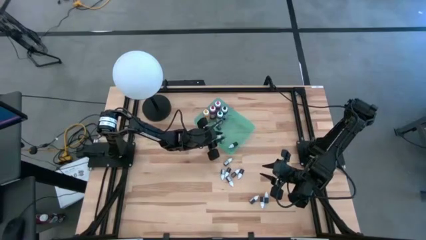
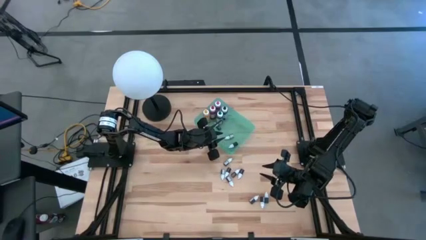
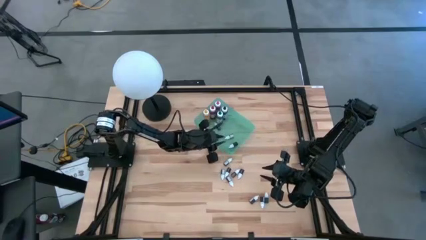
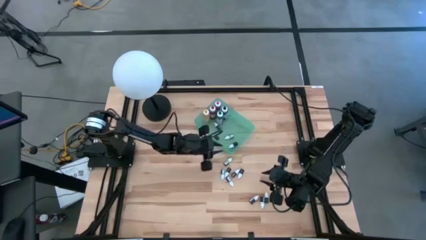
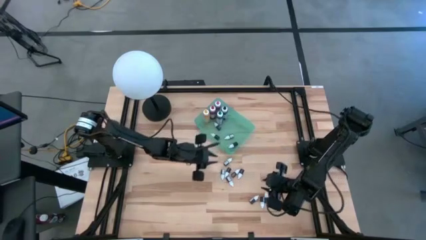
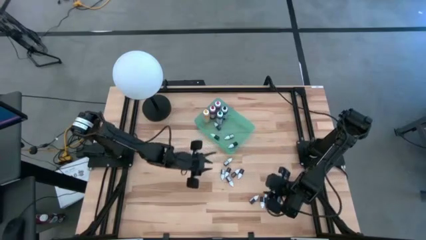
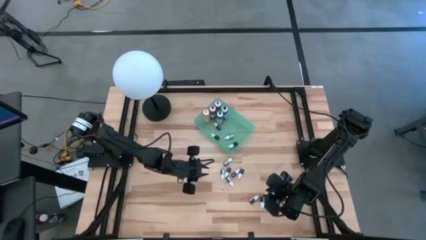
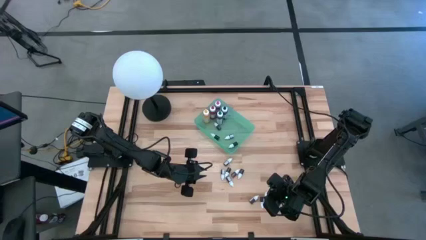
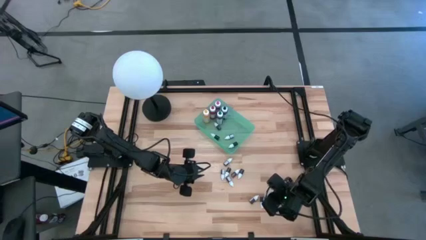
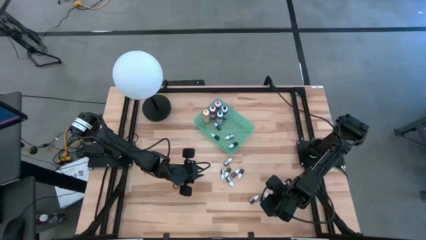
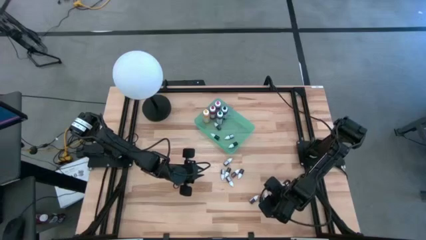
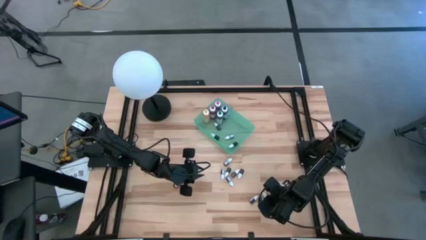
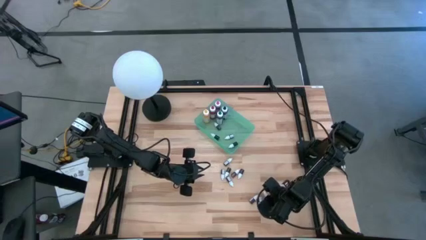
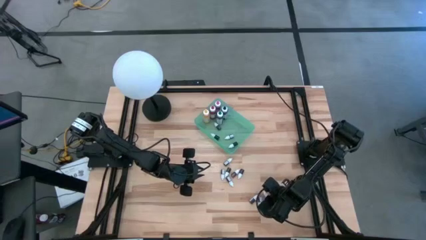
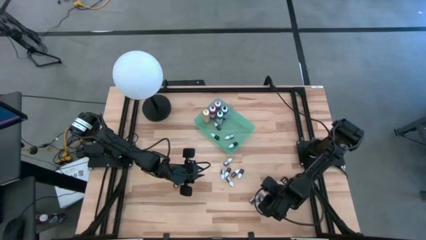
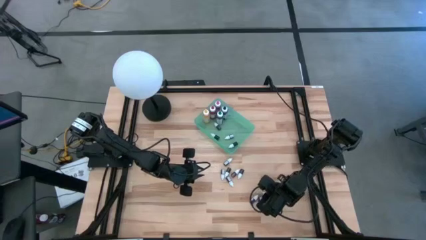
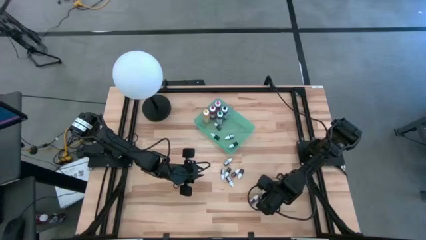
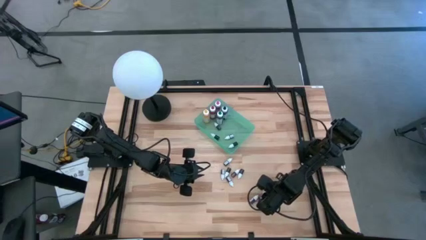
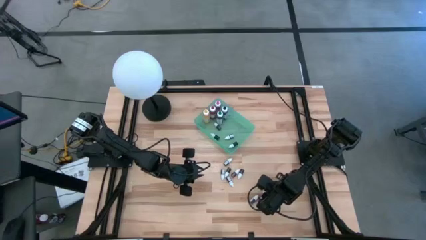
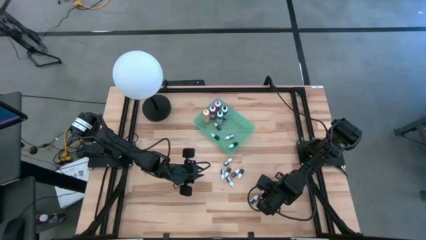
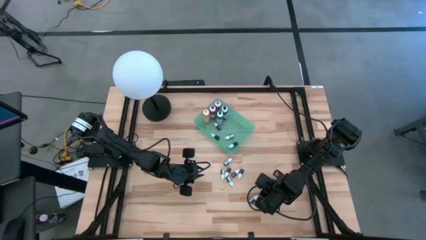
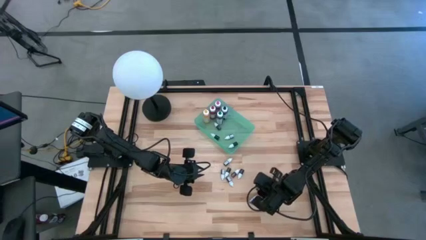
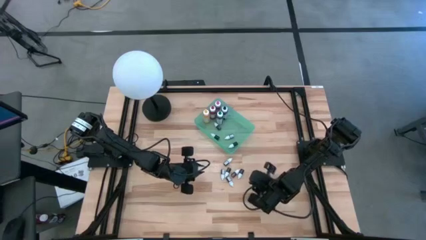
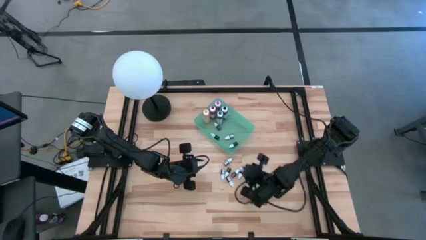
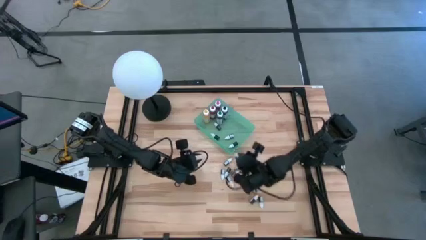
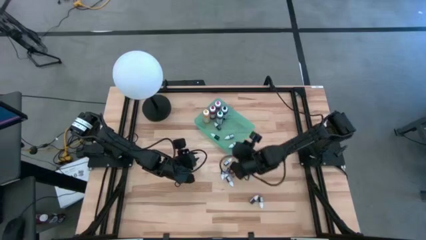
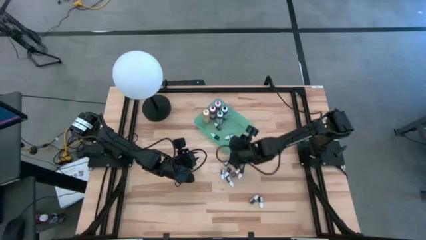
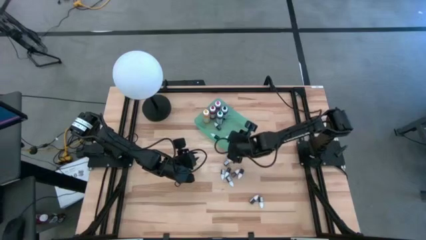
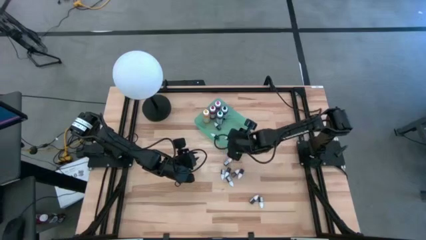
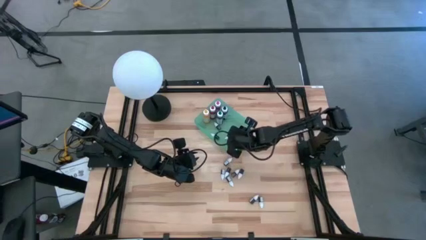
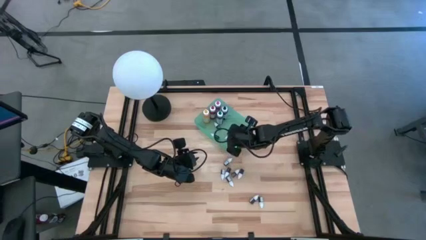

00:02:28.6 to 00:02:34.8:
Task: Pick & Place food coloring
Put the small blue food coloring bottle into the green bin

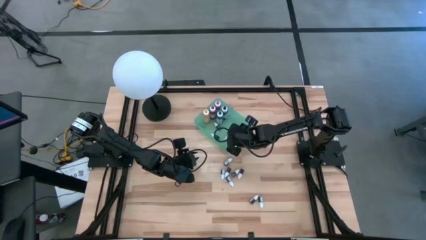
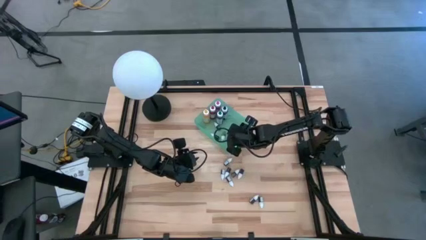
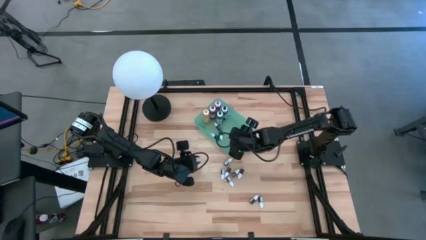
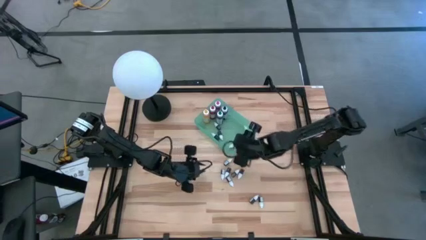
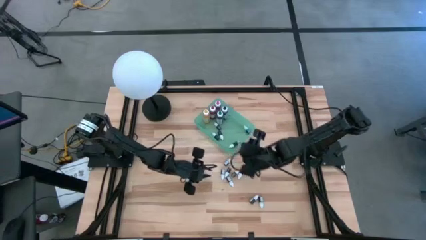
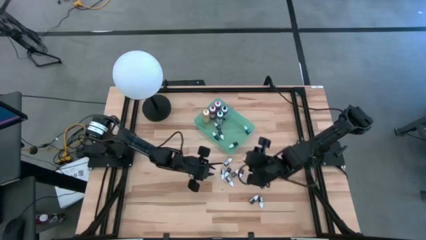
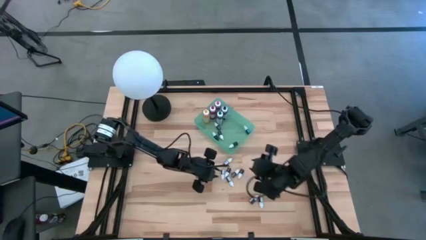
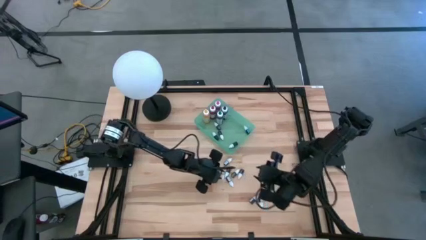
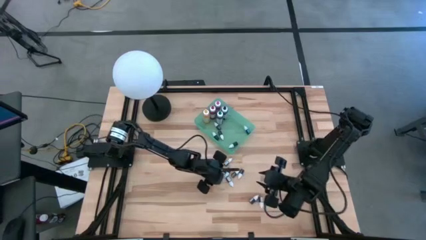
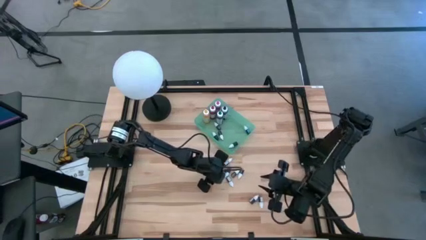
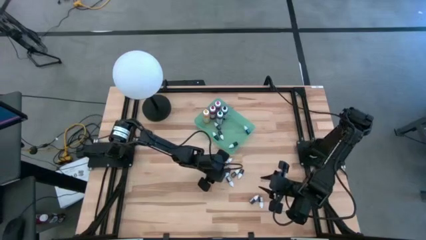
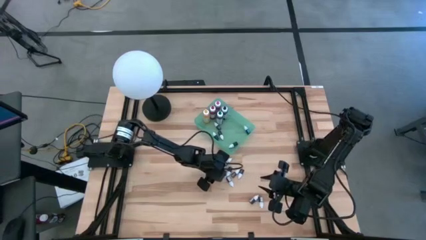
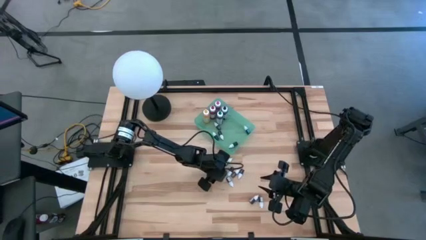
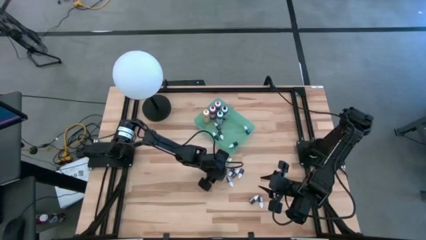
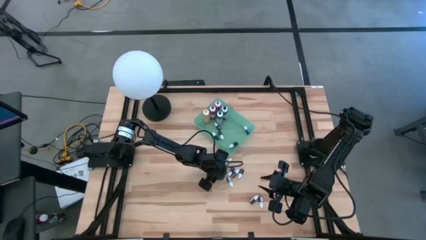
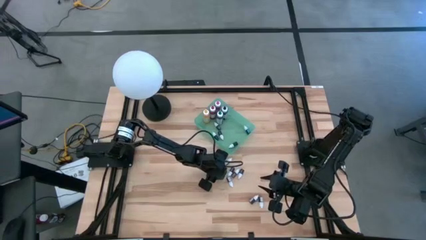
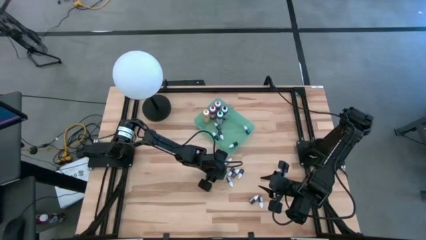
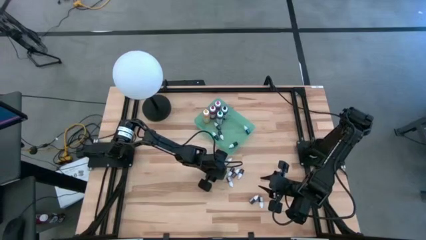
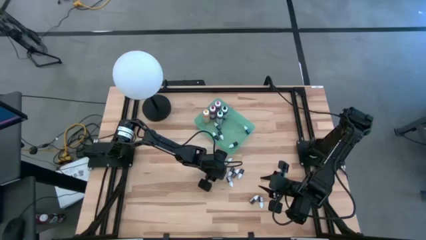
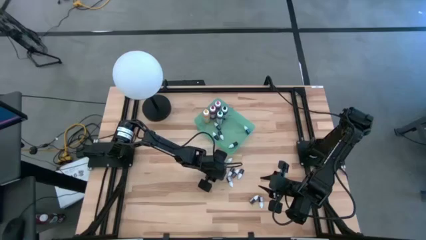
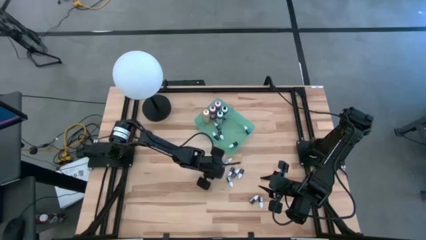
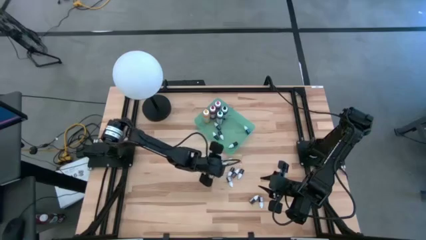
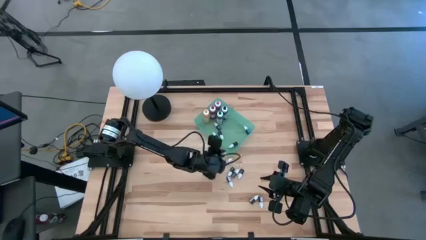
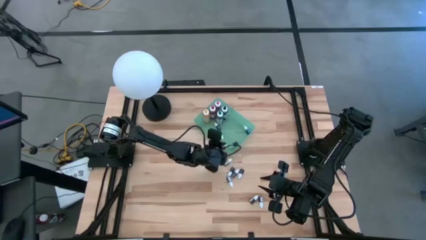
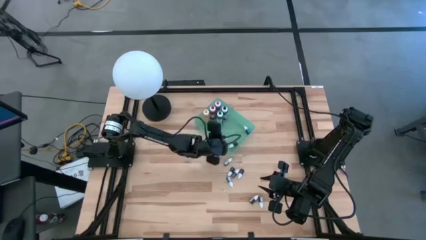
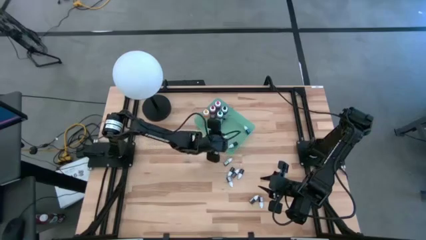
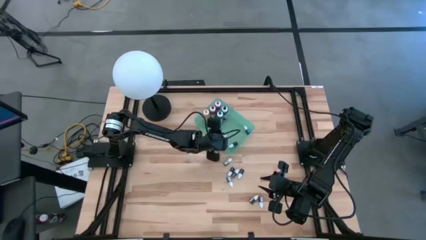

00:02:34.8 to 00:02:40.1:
Put the small black food coloring bottle into the green bin

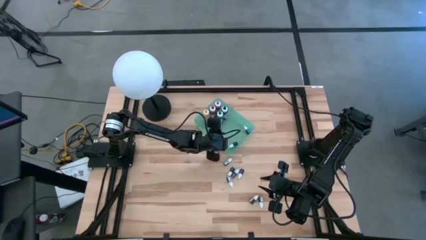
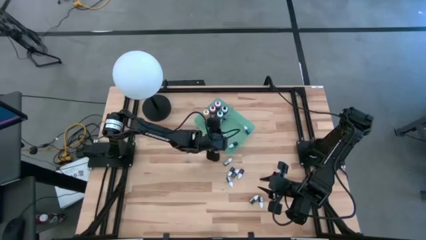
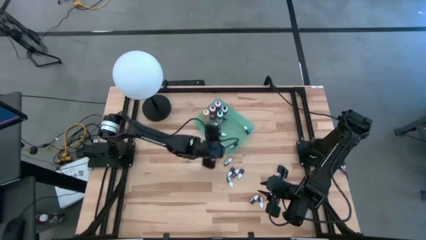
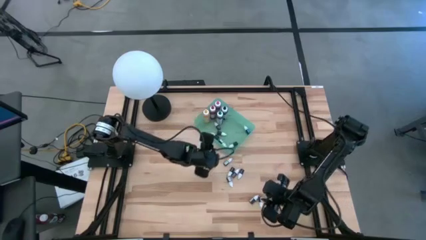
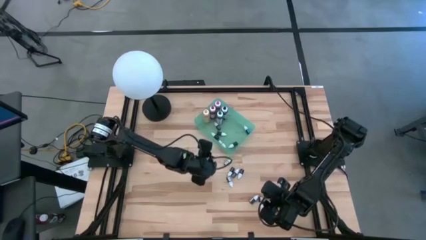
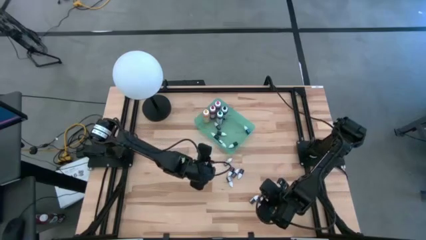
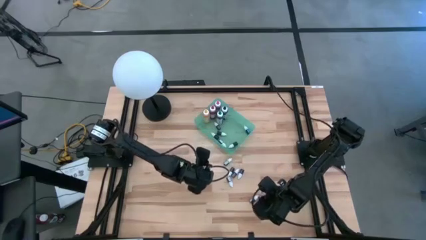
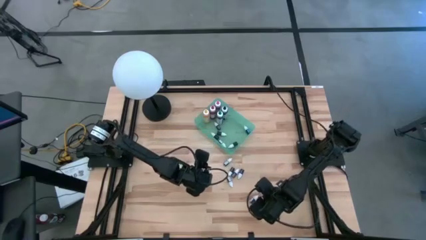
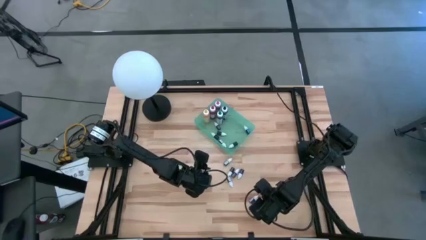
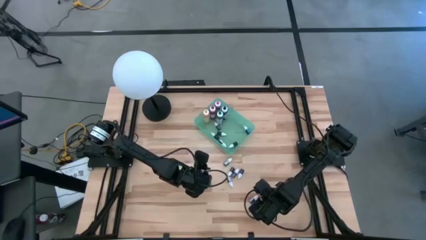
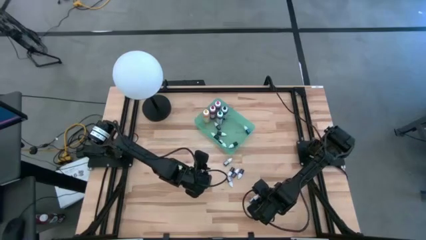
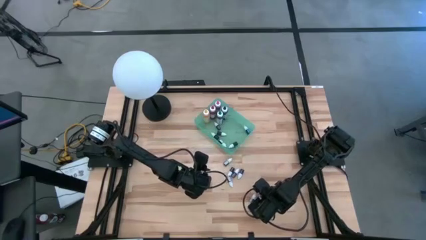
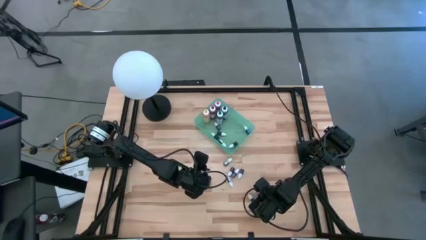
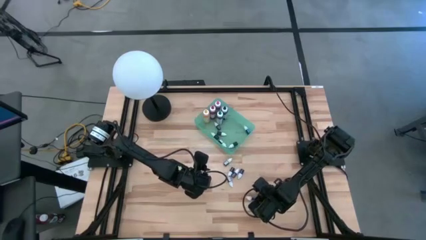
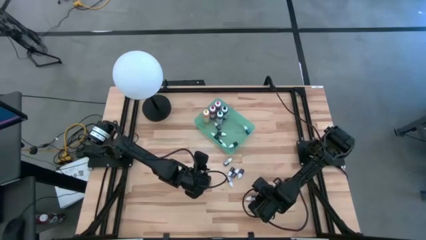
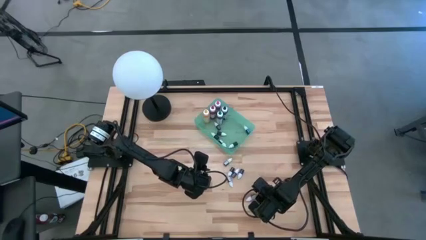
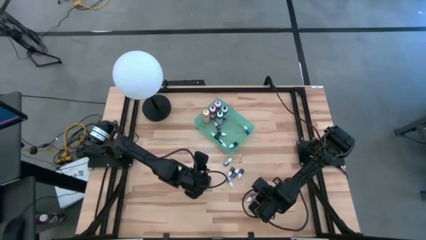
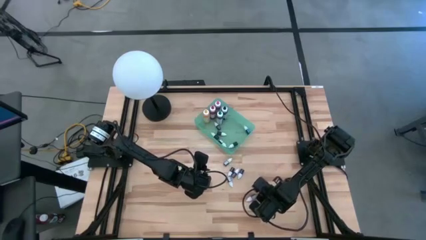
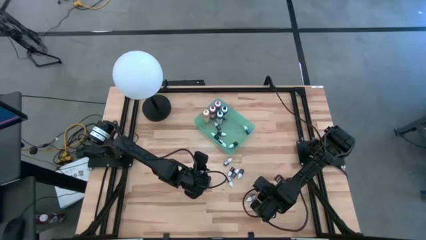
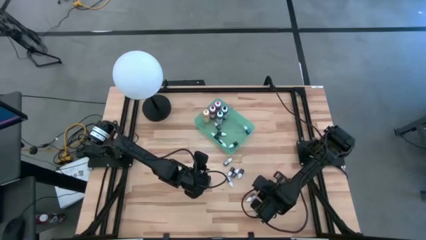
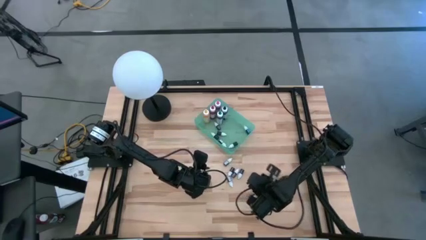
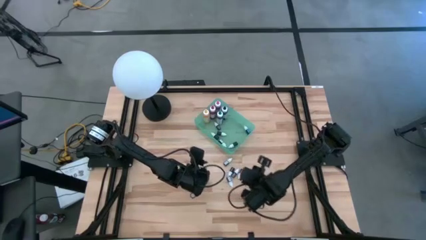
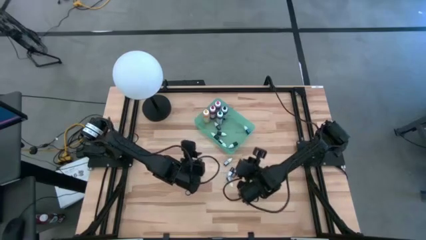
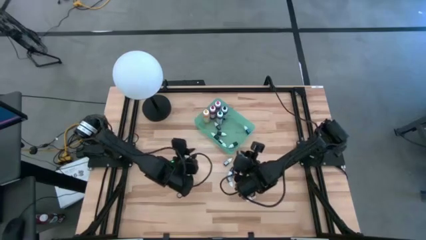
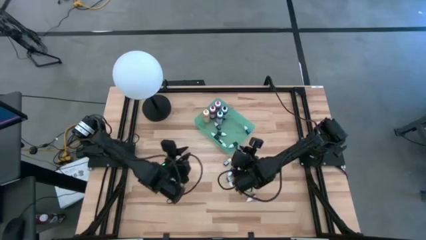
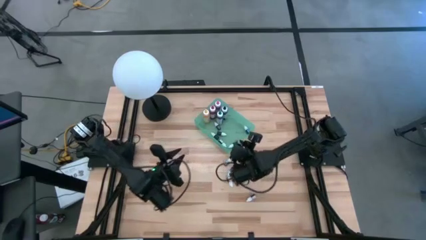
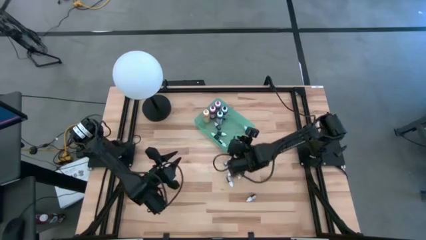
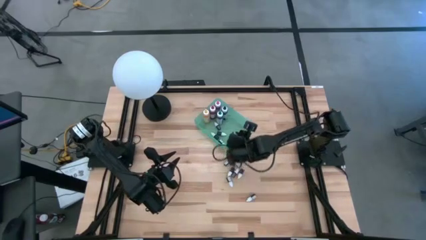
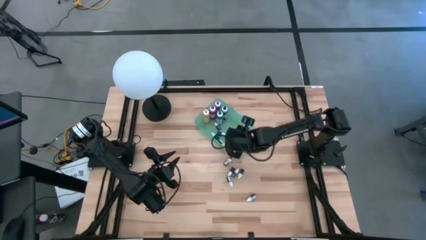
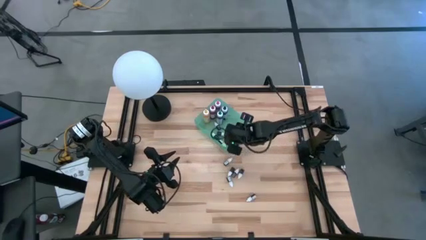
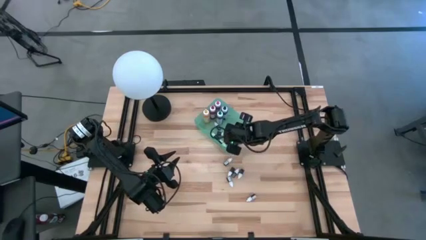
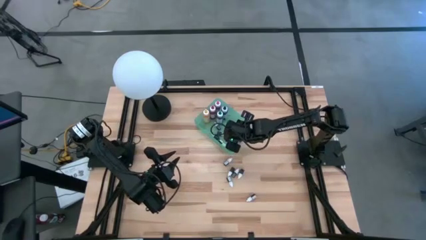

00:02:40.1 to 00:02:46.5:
Put the small brown food coloring bottle into the green bin
